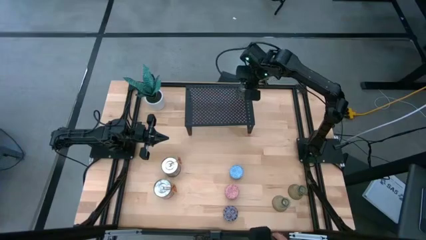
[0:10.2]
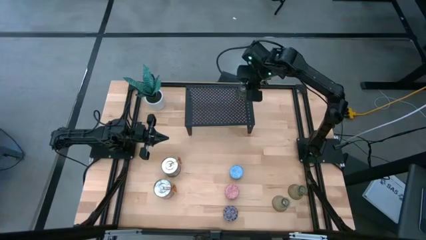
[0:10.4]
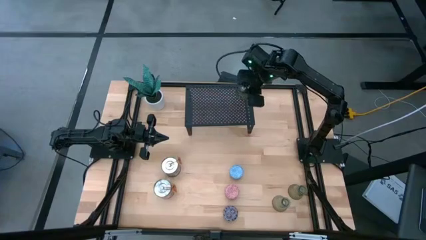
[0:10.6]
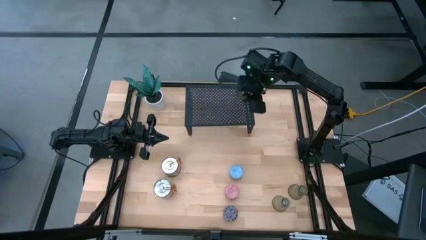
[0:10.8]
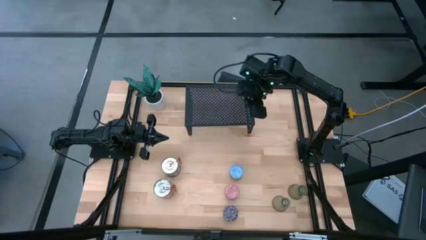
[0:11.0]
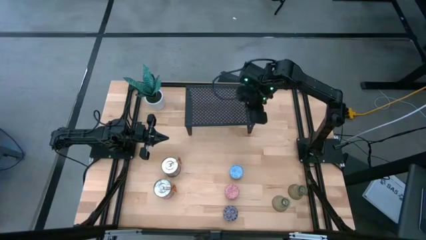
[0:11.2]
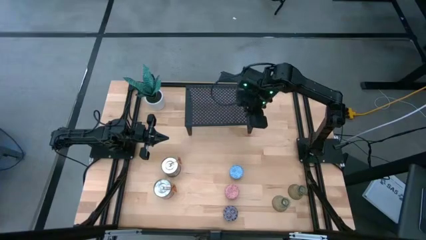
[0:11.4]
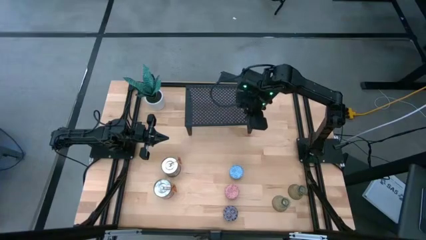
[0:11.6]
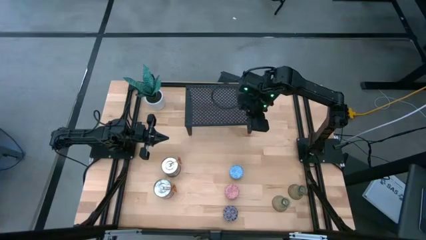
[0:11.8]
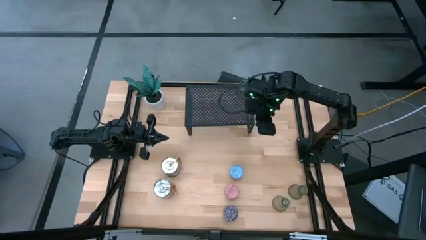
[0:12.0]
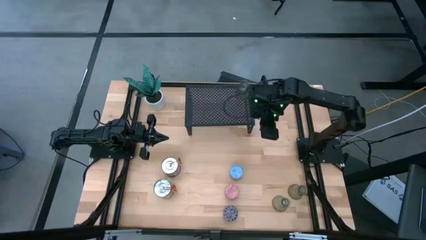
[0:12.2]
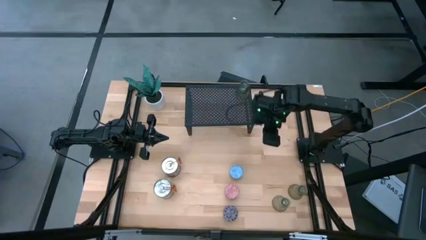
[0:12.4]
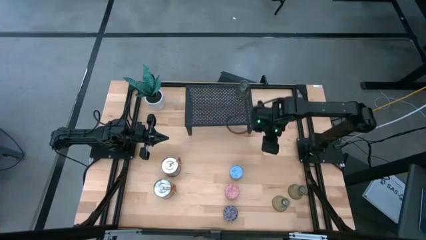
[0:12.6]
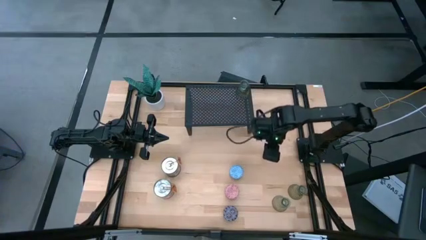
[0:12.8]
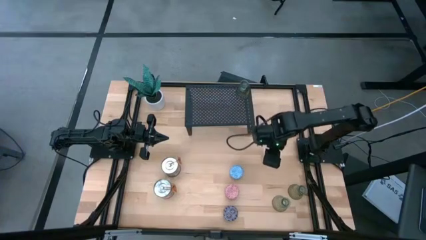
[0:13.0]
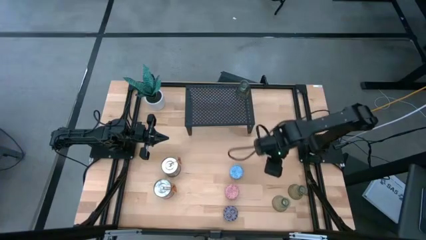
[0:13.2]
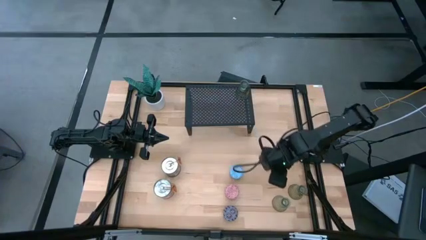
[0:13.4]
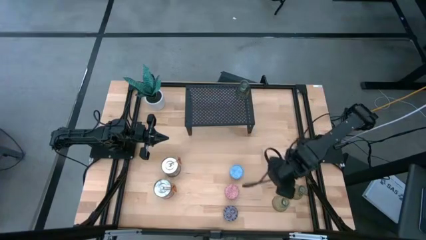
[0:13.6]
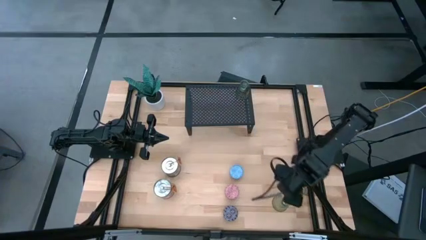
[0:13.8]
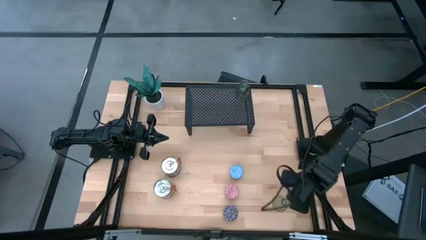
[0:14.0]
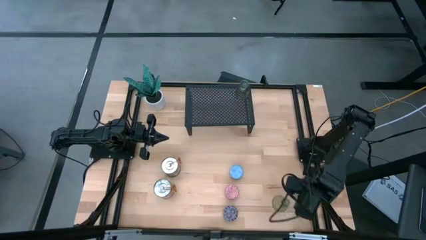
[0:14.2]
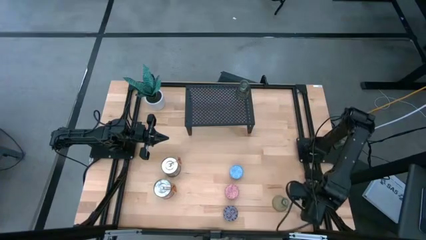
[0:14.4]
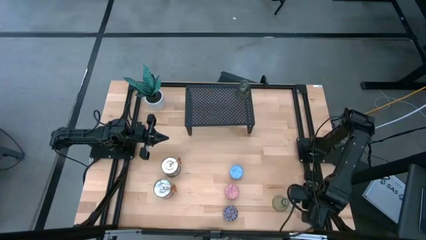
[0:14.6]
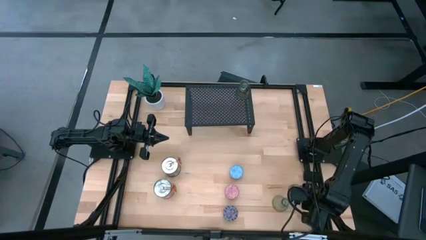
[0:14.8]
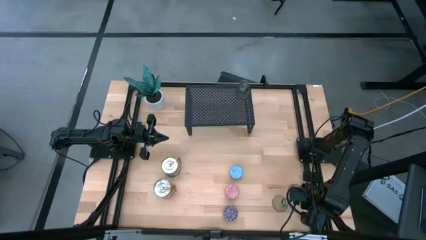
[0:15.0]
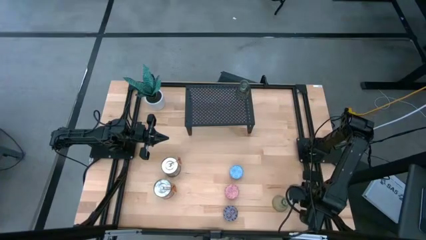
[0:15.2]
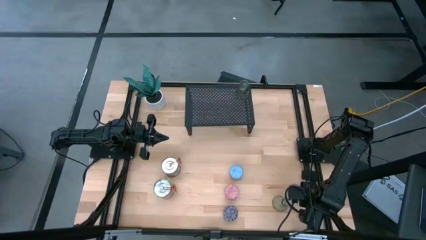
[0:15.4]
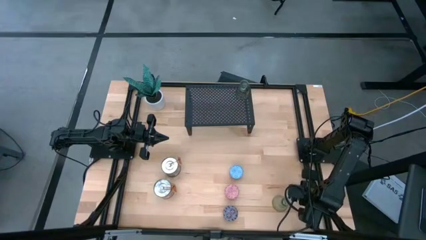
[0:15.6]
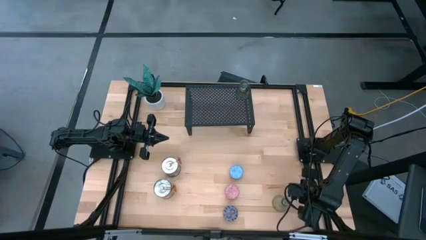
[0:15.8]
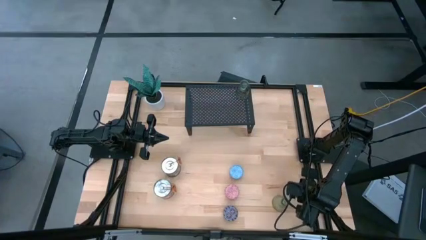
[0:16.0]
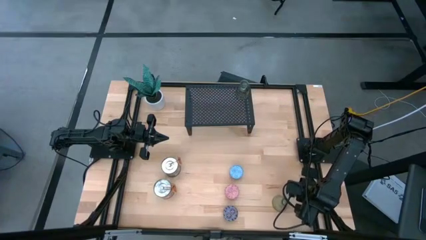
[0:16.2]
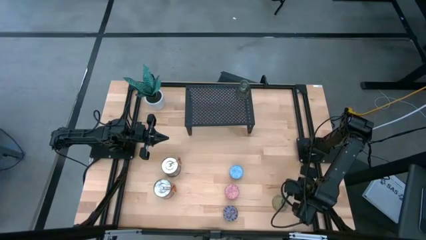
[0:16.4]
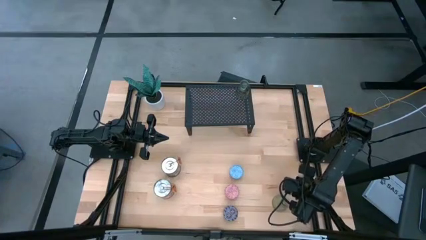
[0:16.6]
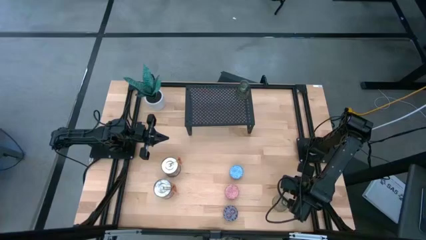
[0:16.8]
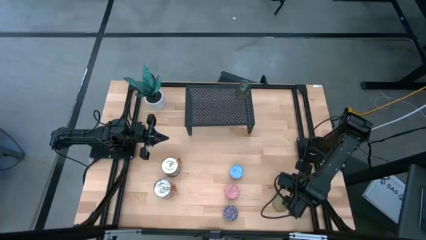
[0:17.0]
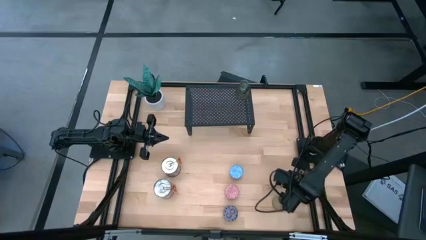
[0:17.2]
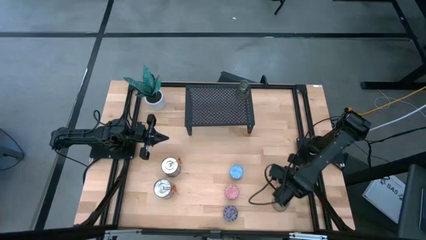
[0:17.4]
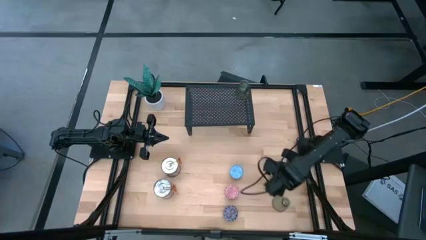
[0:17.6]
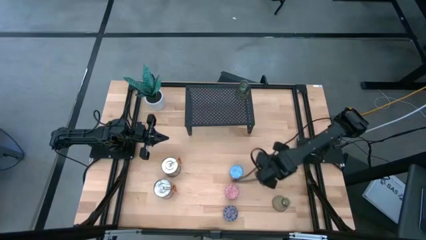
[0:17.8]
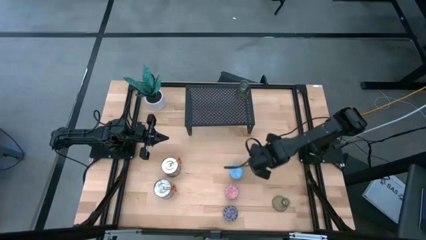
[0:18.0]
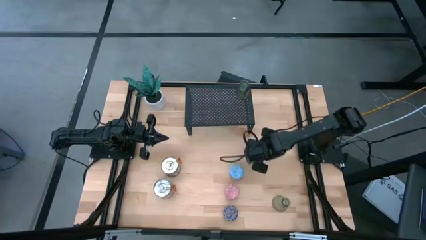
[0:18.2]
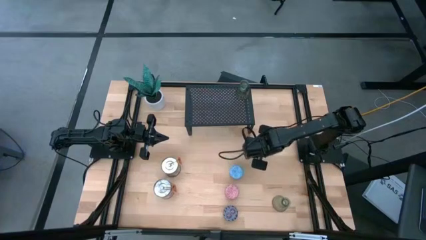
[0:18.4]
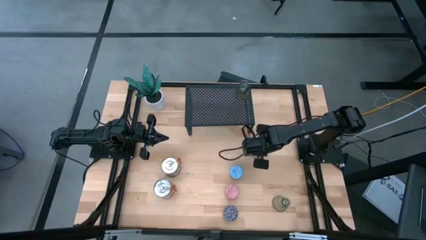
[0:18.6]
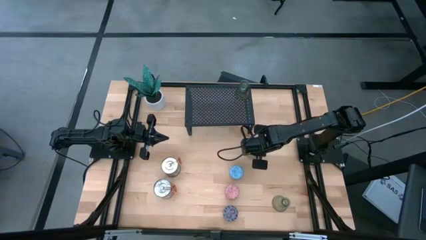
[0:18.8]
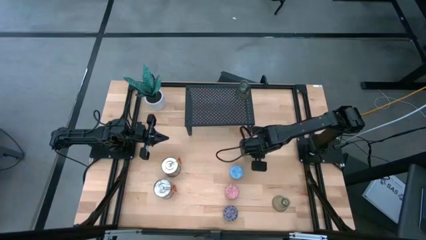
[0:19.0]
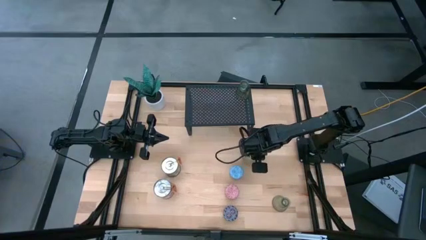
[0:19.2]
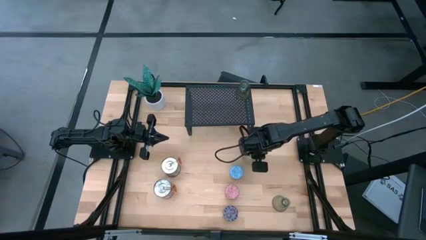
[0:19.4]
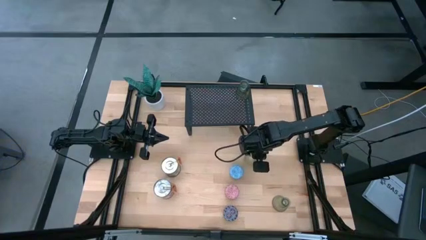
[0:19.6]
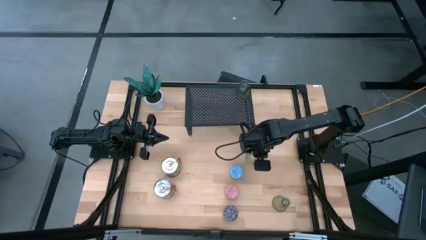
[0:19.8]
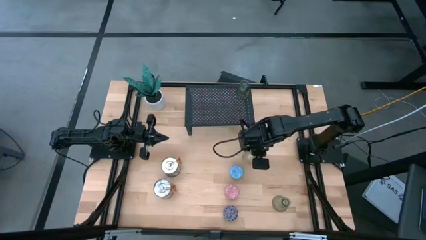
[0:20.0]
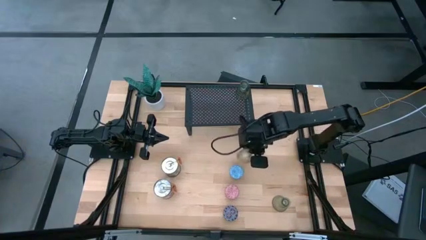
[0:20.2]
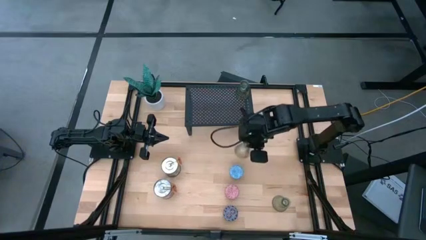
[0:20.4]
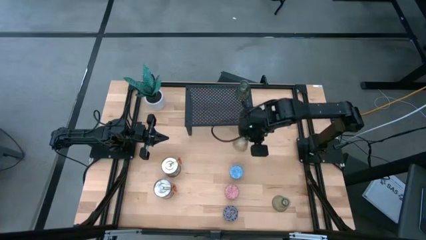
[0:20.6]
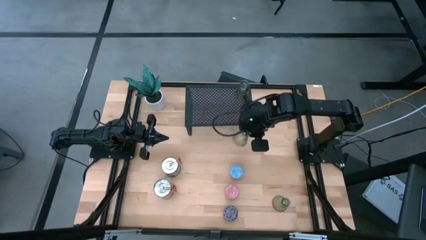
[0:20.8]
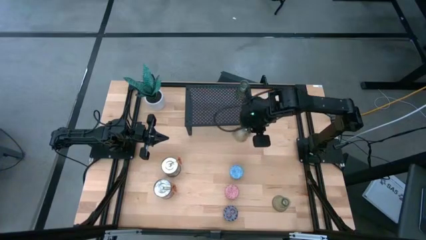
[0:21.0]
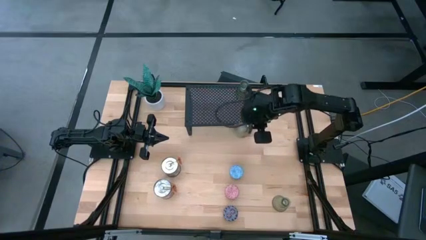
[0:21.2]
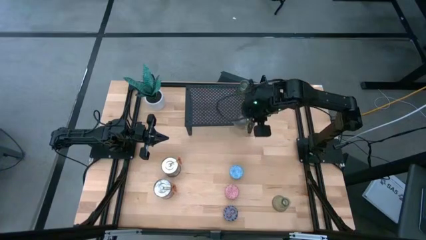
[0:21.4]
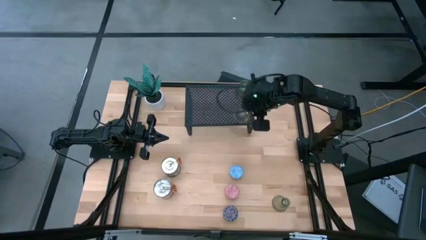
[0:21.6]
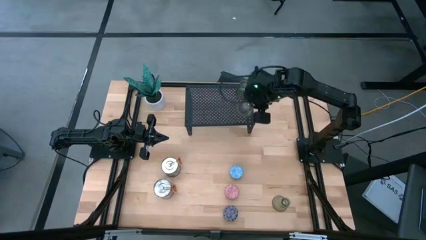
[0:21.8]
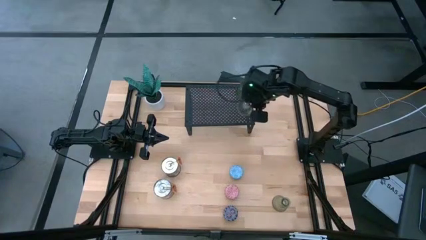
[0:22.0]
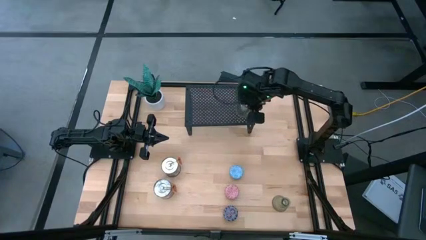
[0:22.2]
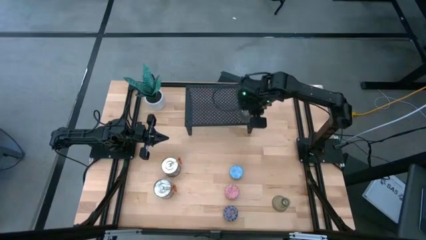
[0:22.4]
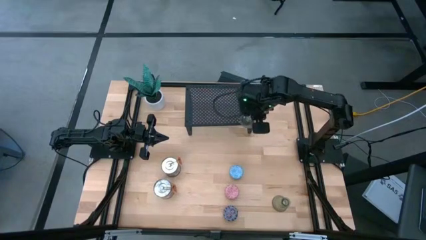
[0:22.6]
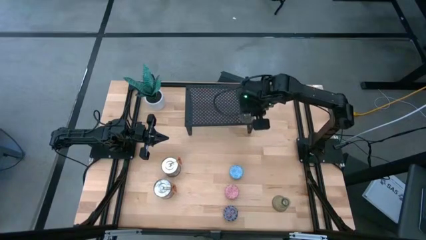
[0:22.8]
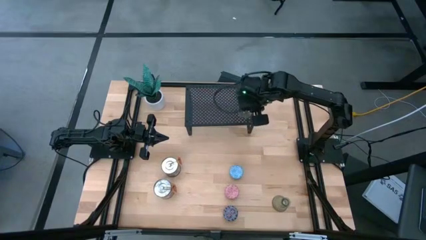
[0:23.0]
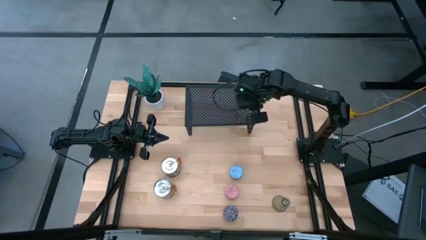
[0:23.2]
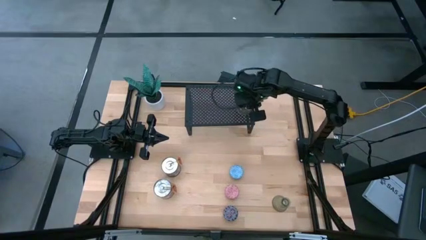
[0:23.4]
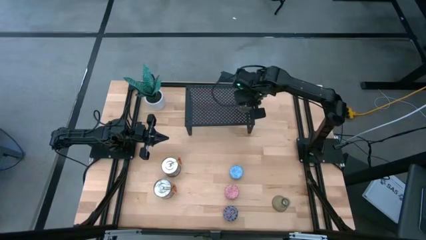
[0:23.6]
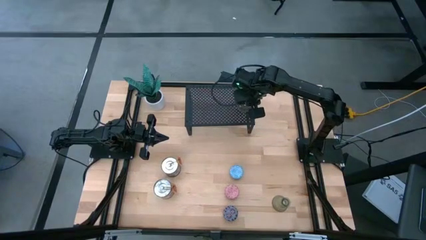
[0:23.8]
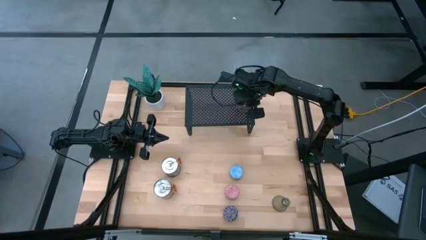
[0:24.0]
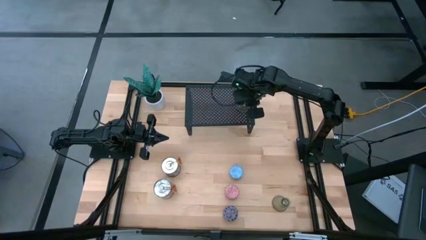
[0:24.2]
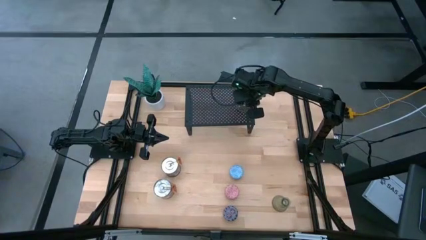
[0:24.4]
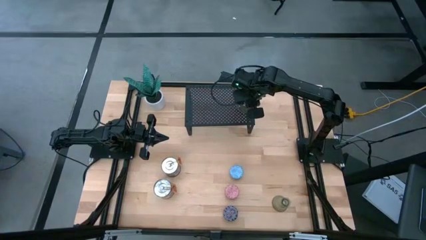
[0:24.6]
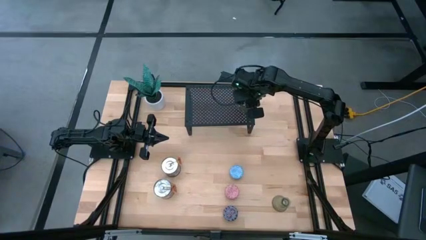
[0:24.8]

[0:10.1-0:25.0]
Task: Pick & Place candle stick holders
Put the right candle holder on the shelf
